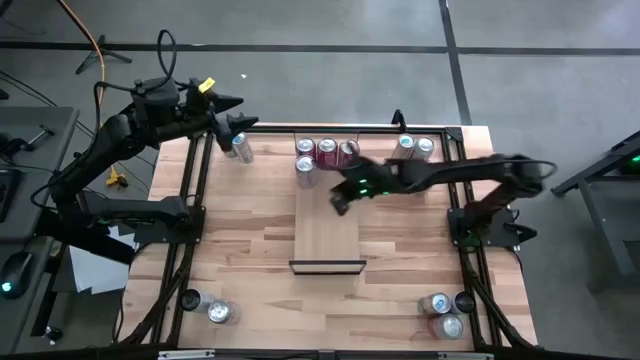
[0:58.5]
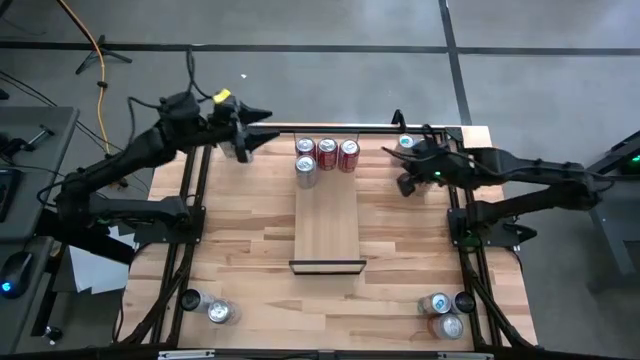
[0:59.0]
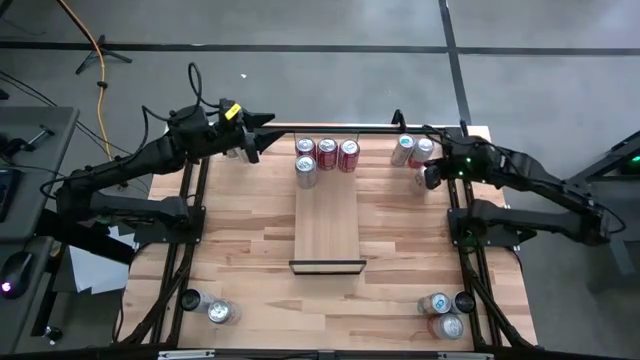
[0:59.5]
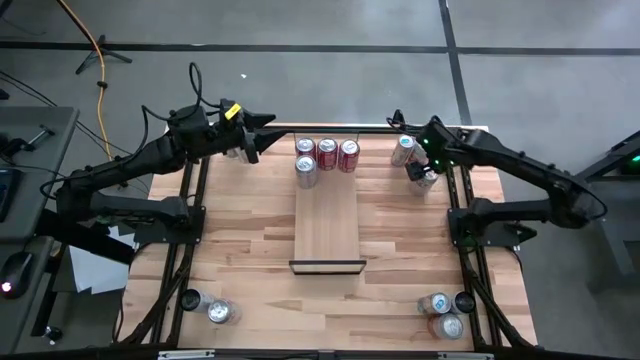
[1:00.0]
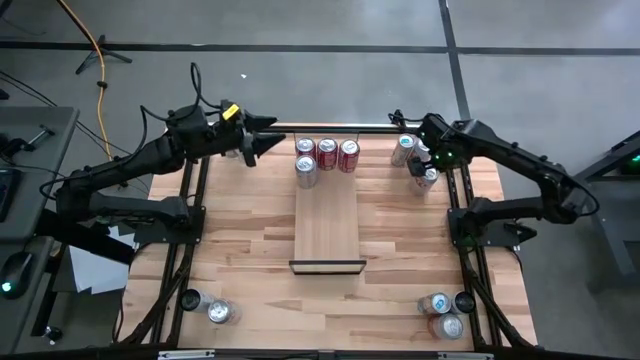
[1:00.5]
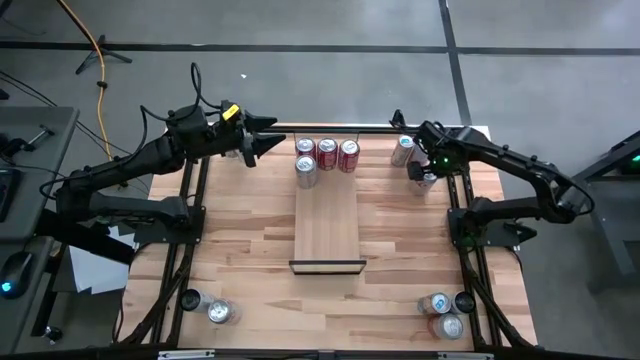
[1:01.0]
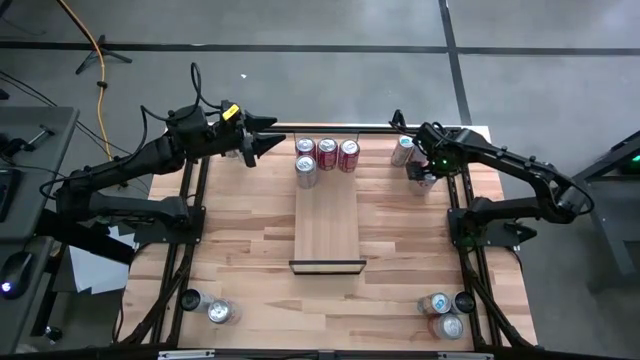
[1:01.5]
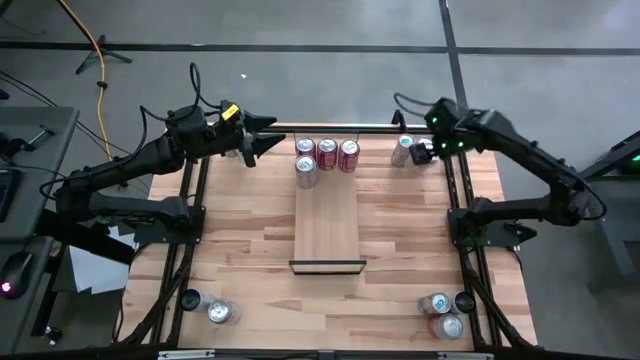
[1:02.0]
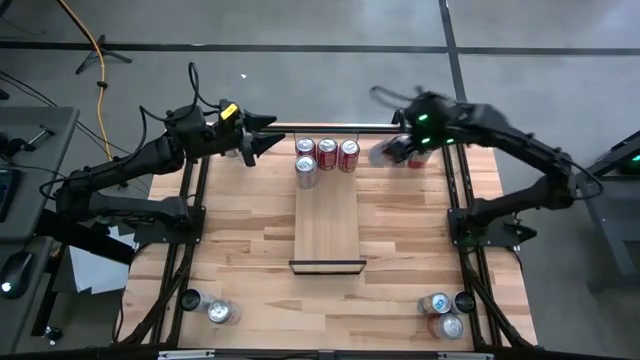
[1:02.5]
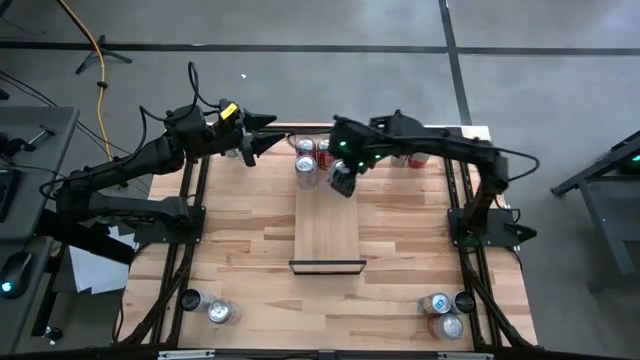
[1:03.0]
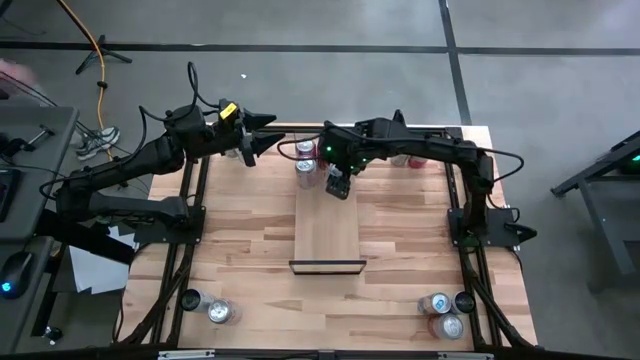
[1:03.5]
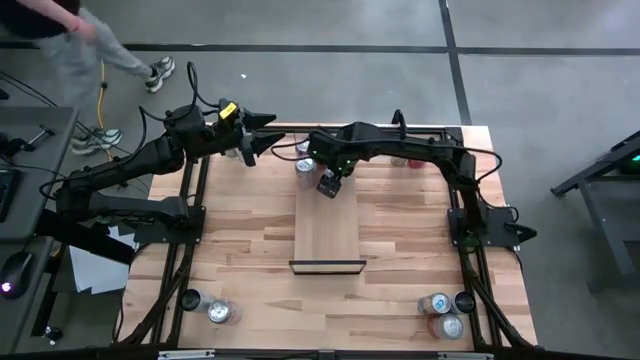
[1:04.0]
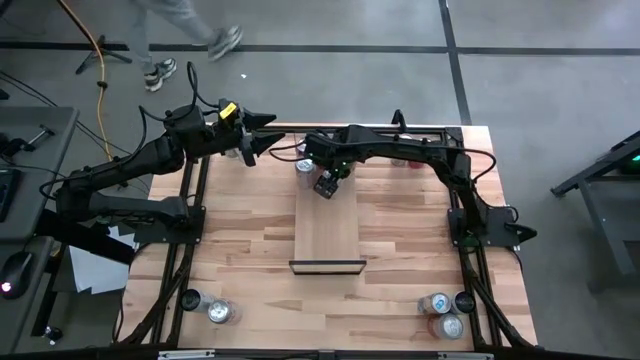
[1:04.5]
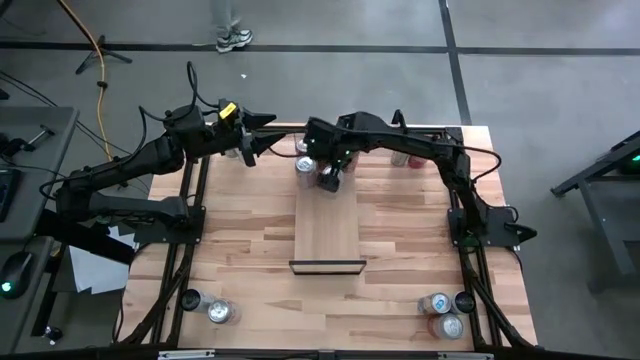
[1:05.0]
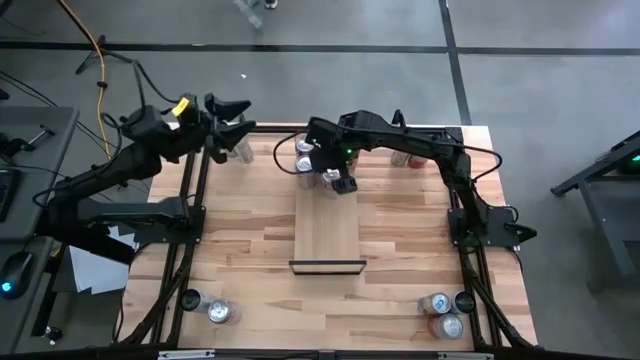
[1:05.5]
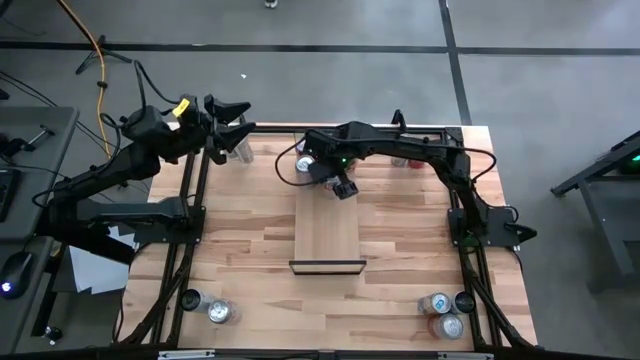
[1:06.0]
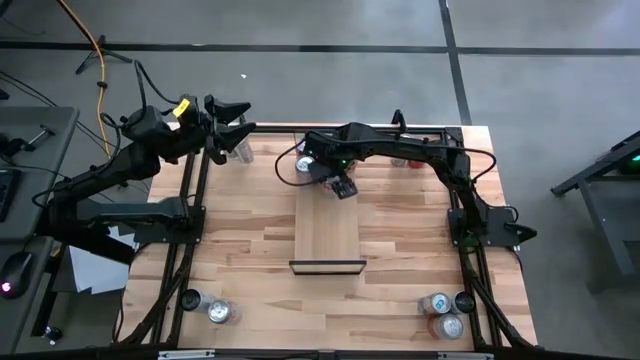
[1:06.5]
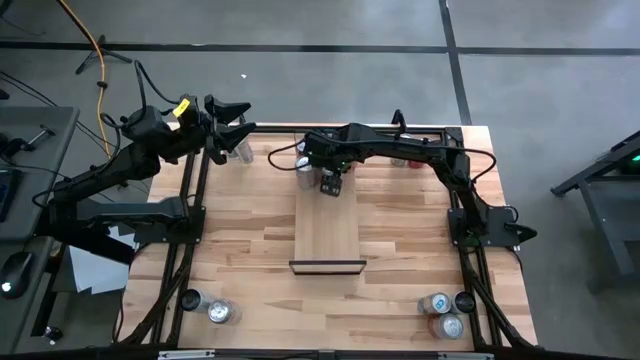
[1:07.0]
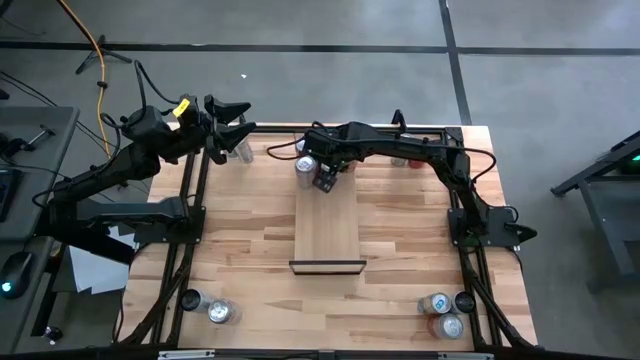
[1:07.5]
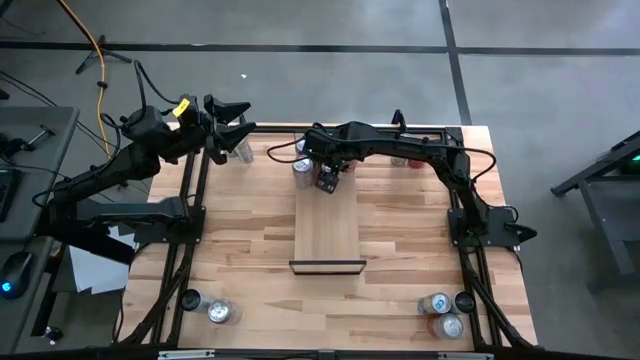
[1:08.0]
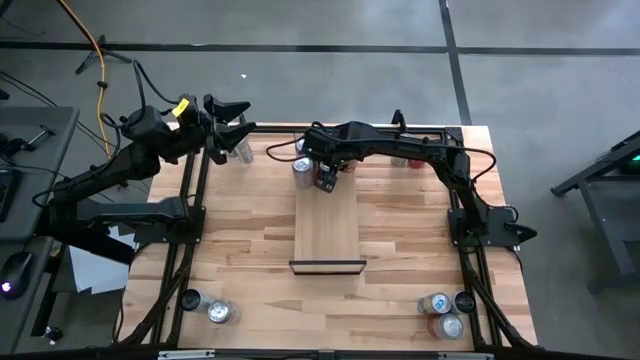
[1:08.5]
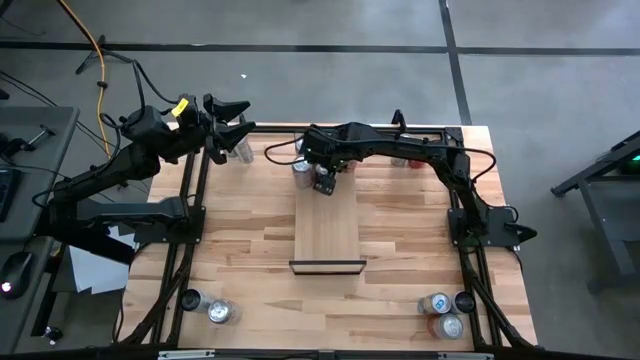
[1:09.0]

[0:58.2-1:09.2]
Task: Place canned beverage on shelf
Put the right red silver soda can on the shelf aligned with the other red silver soda can

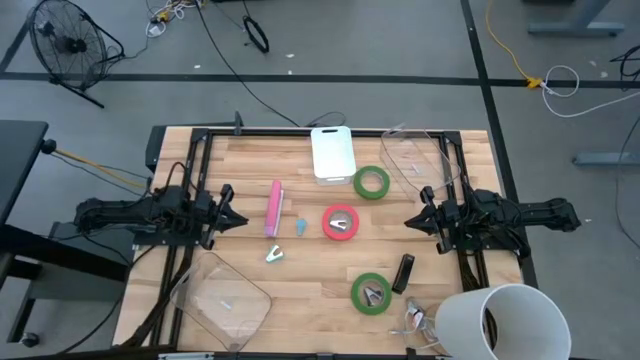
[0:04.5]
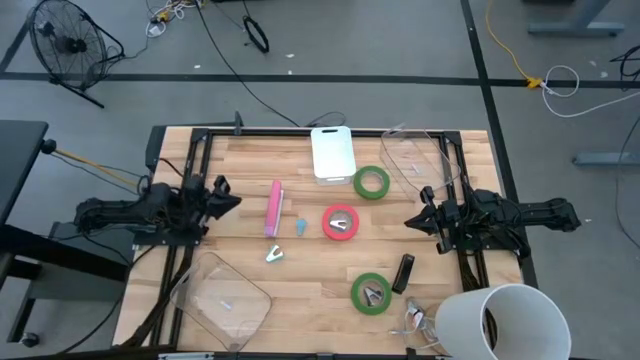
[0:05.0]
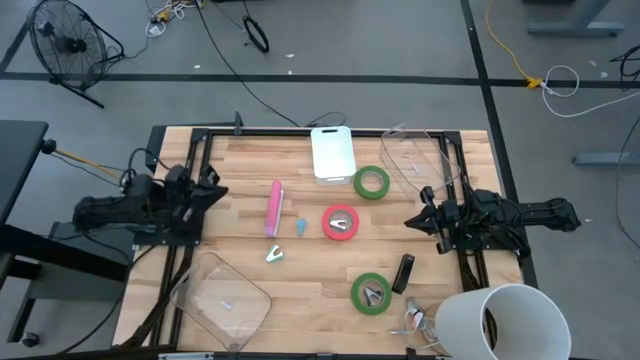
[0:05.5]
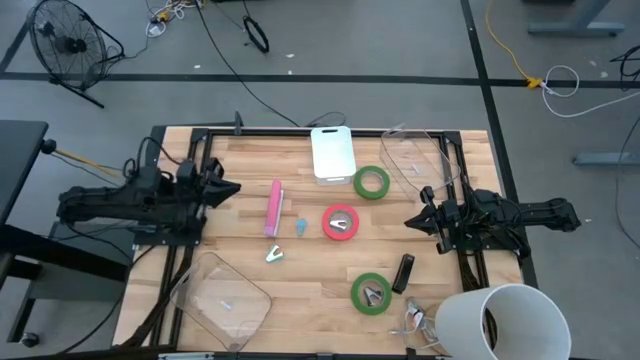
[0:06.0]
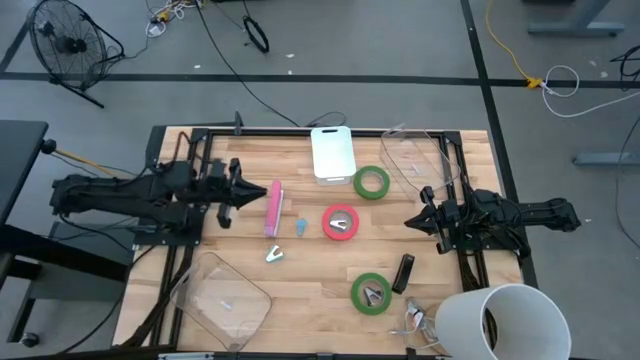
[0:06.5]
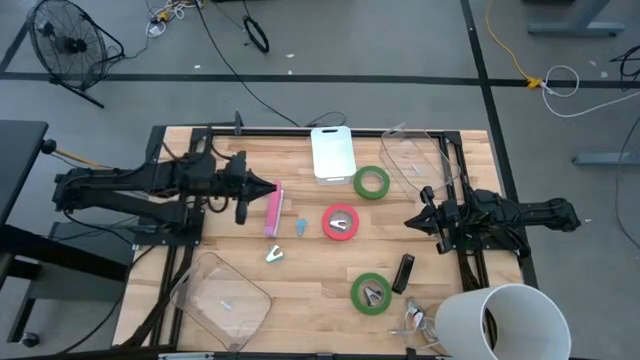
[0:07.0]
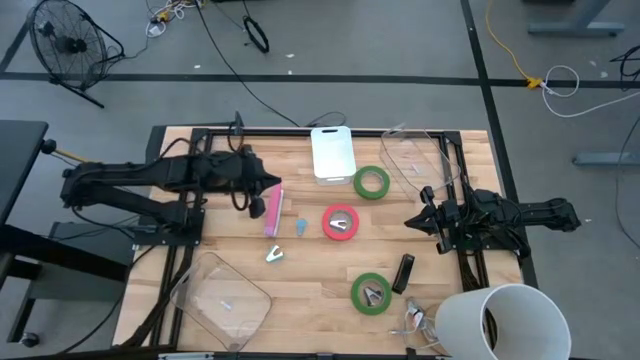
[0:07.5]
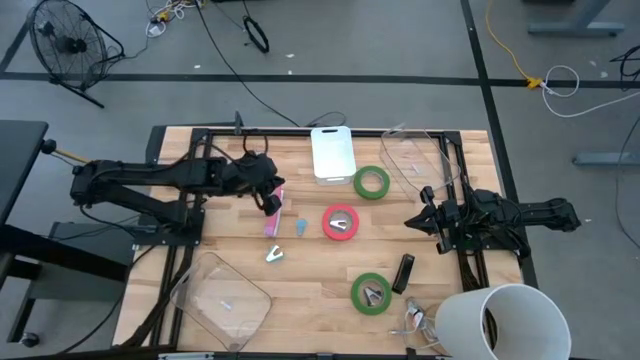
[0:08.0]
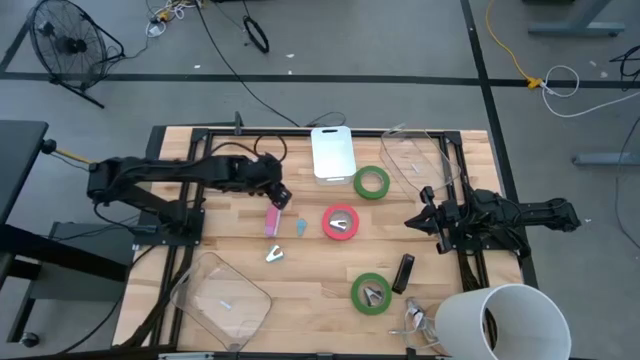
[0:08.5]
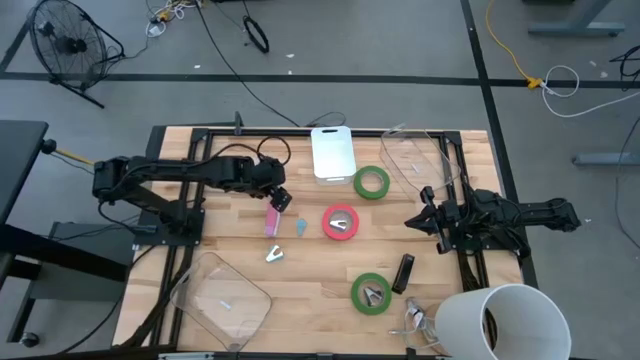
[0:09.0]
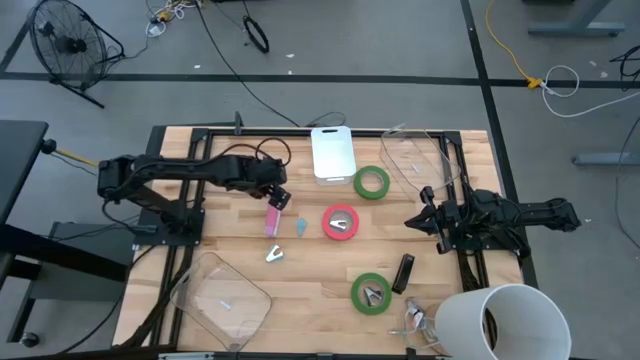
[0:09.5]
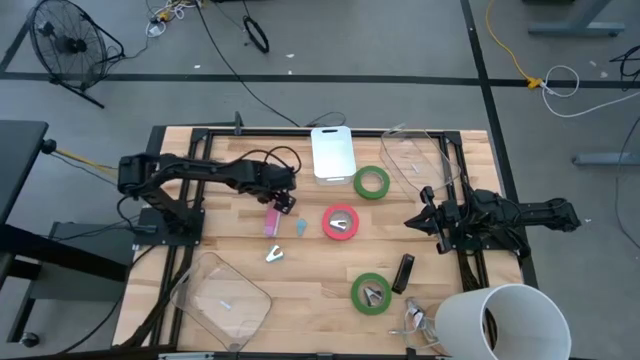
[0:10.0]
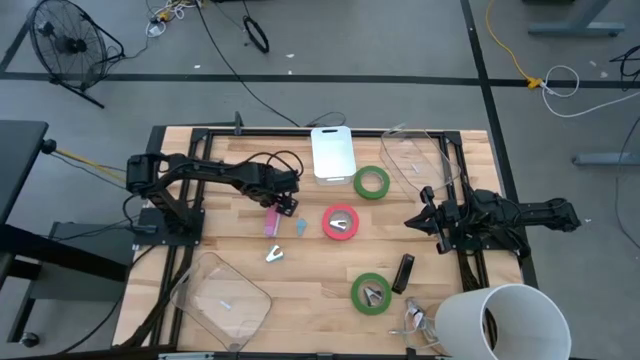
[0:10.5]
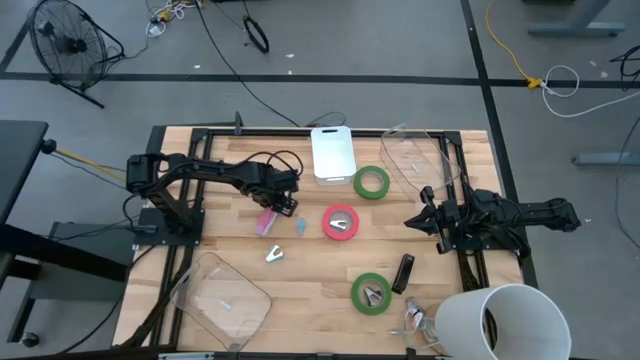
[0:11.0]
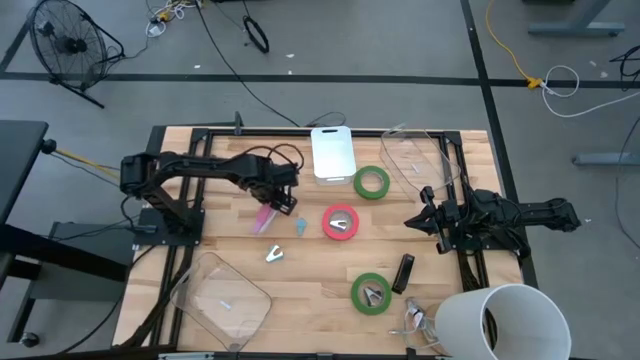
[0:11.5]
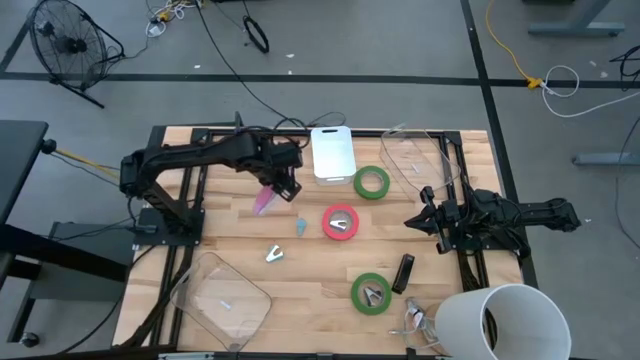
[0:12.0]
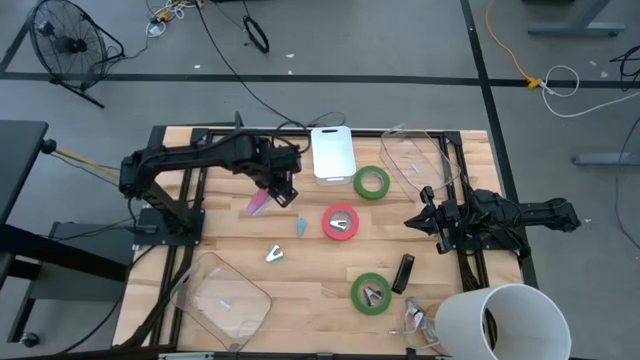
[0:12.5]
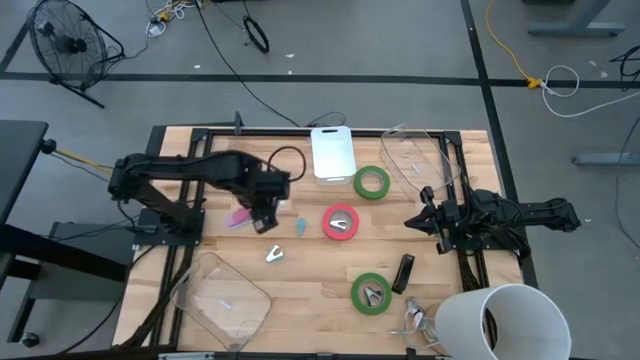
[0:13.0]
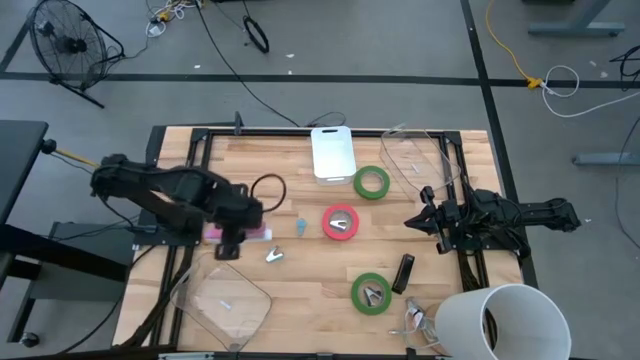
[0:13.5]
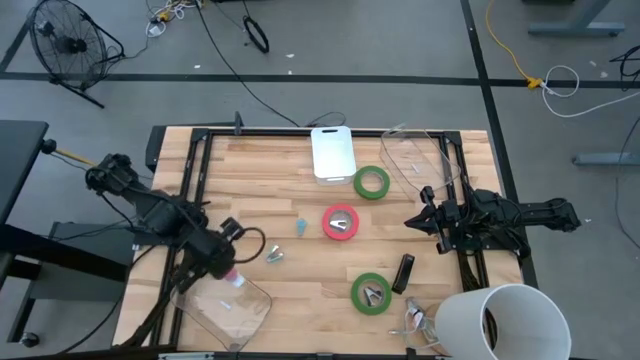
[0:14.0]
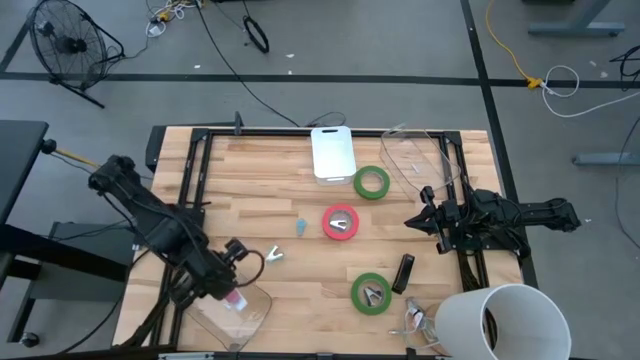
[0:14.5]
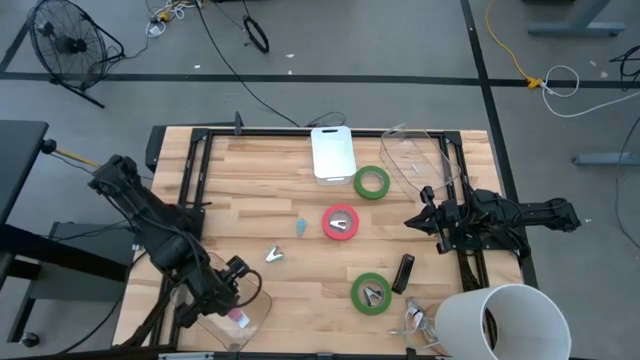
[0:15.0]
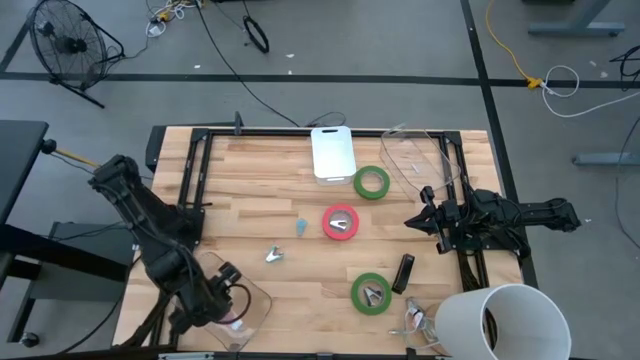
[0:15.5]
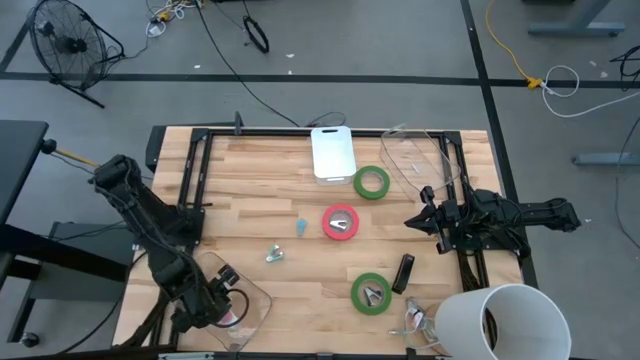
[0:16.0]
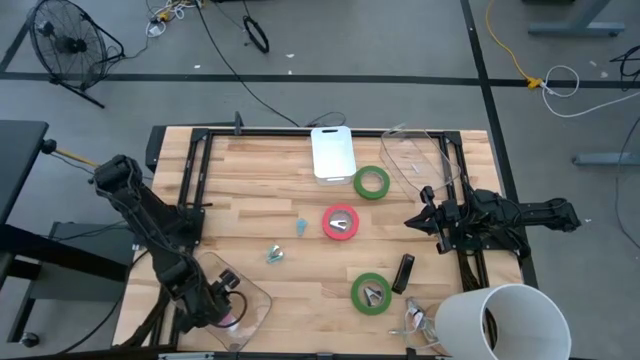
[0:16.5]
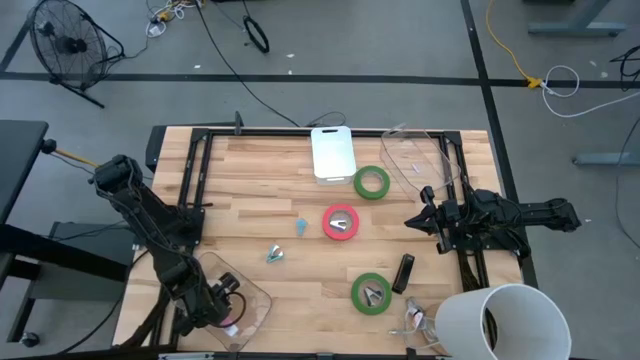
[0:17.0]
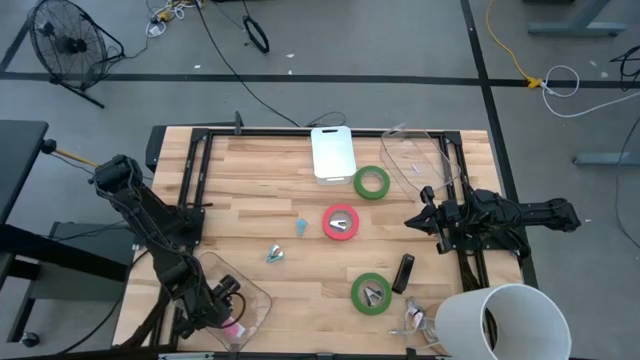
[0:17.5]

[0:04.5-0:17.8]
Task: Pick and place Stapler, Stapler remover, tape
Put the pink stapler into the bottom transparent bin
